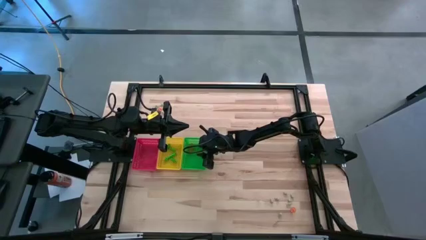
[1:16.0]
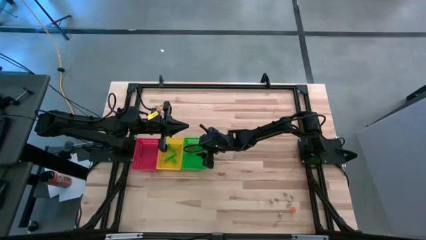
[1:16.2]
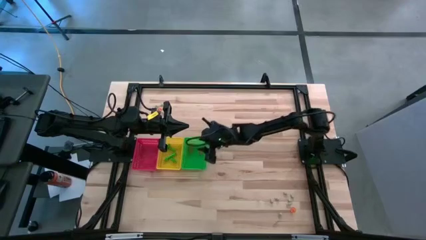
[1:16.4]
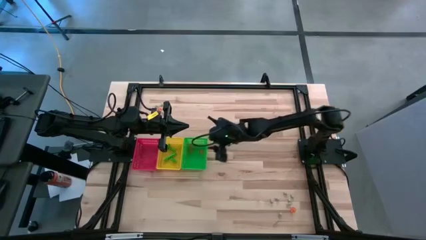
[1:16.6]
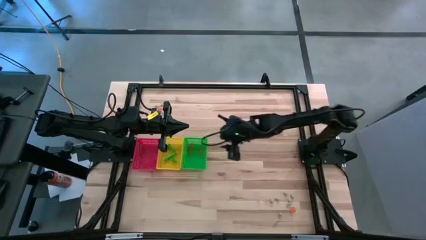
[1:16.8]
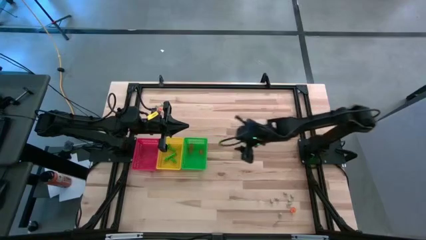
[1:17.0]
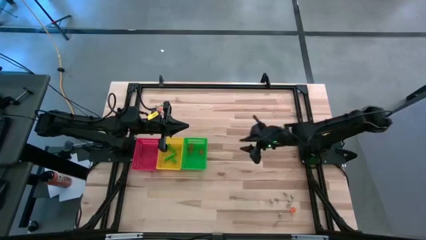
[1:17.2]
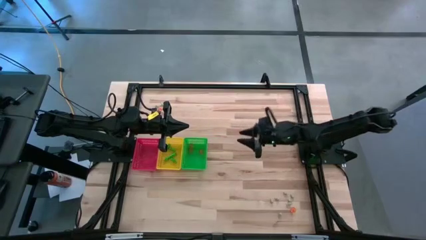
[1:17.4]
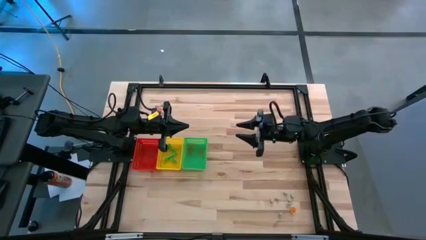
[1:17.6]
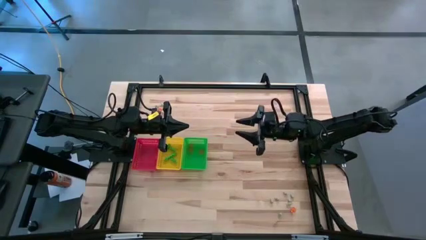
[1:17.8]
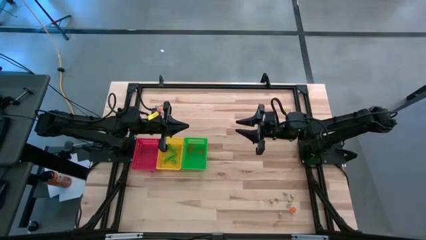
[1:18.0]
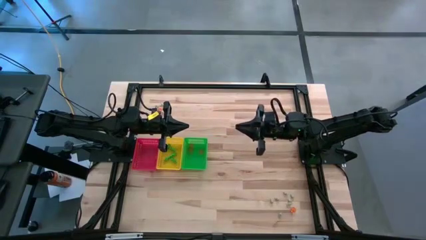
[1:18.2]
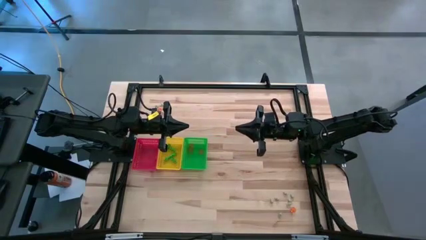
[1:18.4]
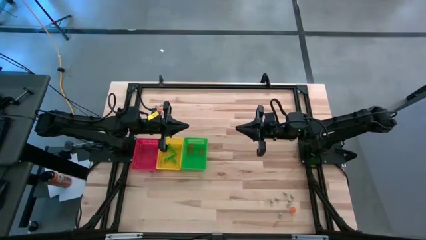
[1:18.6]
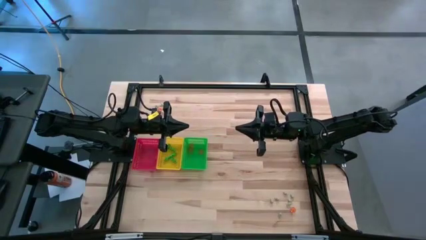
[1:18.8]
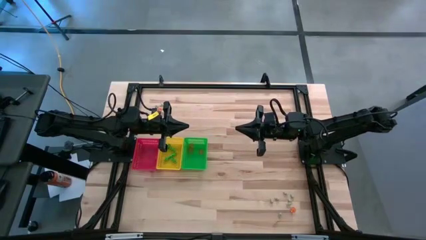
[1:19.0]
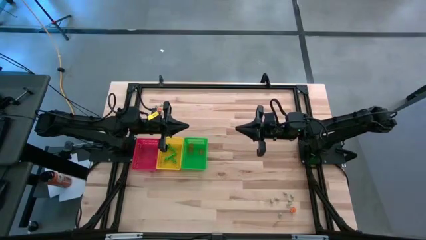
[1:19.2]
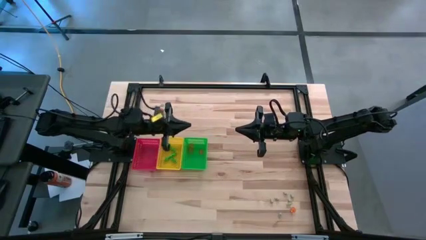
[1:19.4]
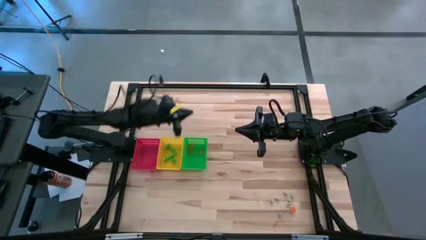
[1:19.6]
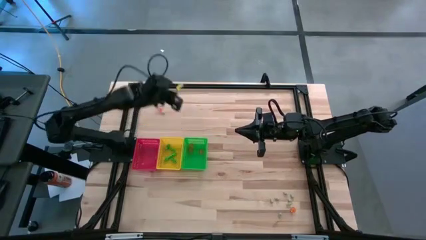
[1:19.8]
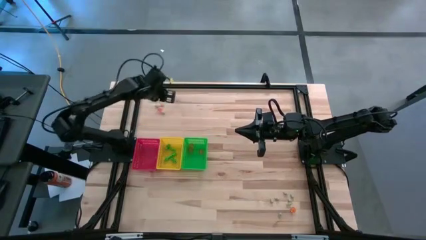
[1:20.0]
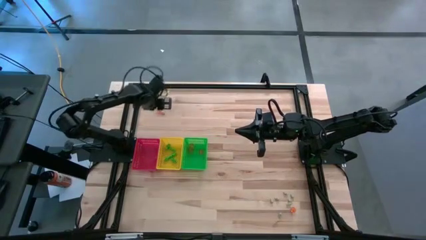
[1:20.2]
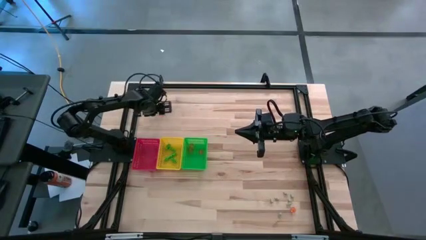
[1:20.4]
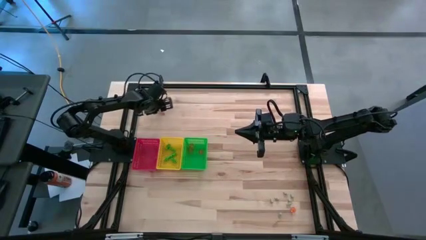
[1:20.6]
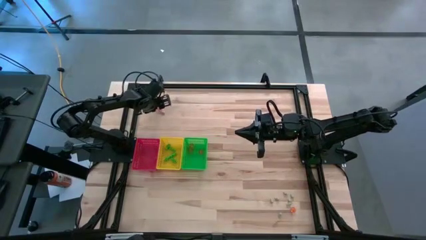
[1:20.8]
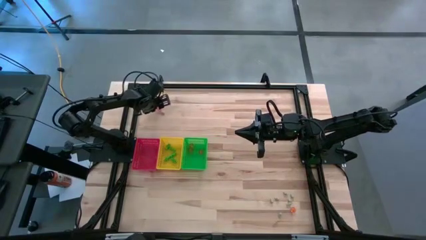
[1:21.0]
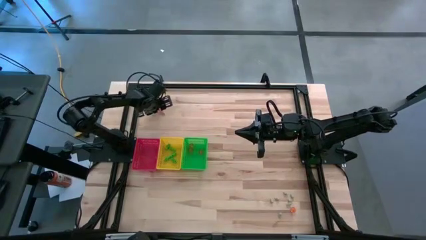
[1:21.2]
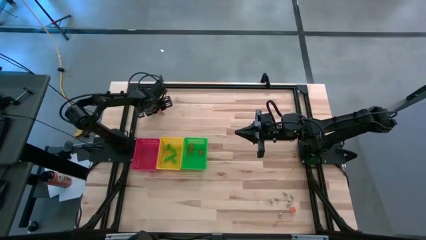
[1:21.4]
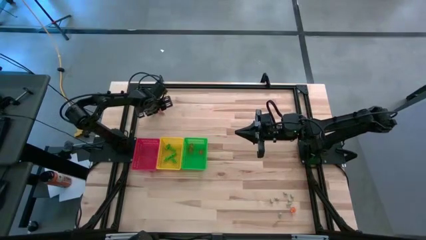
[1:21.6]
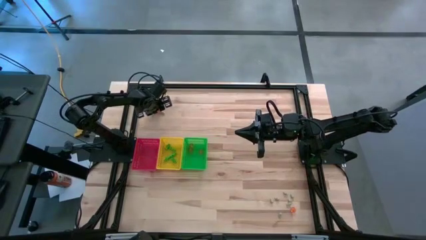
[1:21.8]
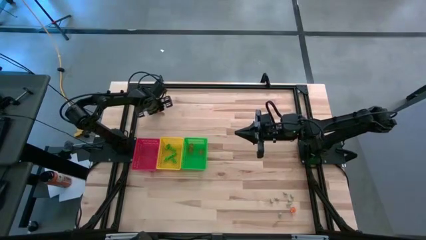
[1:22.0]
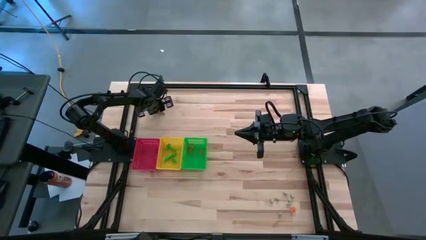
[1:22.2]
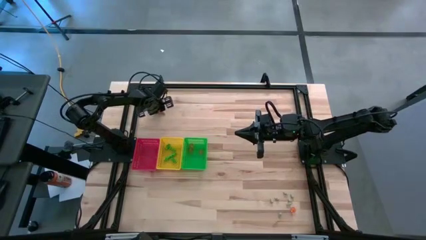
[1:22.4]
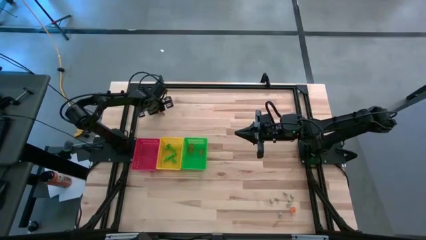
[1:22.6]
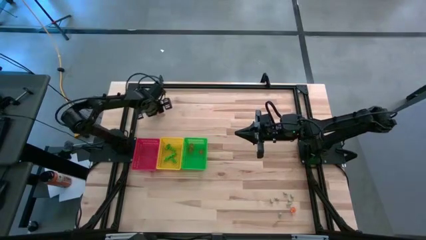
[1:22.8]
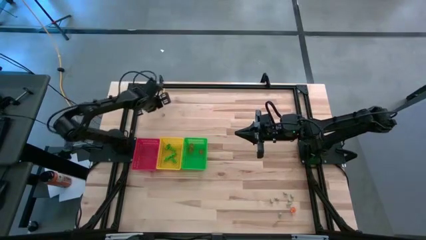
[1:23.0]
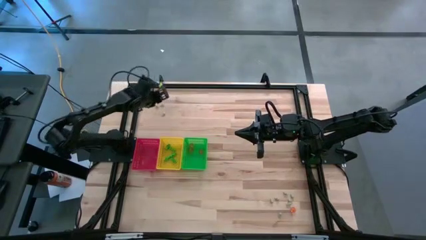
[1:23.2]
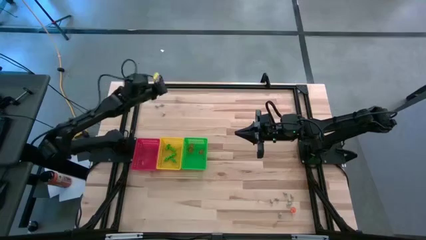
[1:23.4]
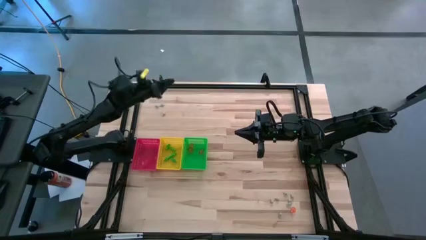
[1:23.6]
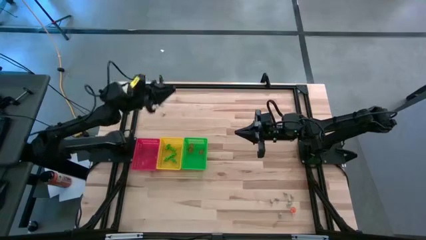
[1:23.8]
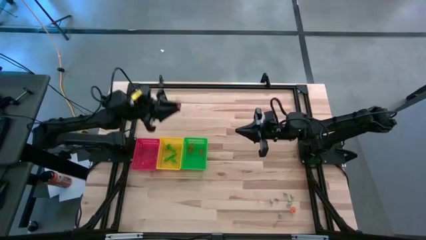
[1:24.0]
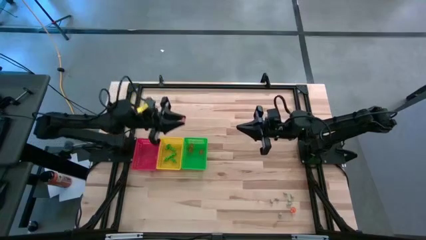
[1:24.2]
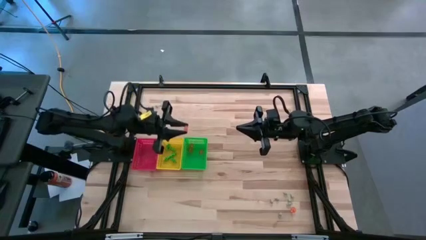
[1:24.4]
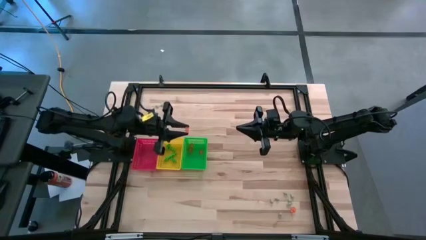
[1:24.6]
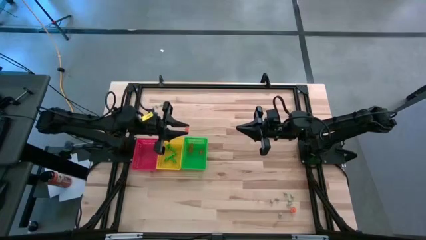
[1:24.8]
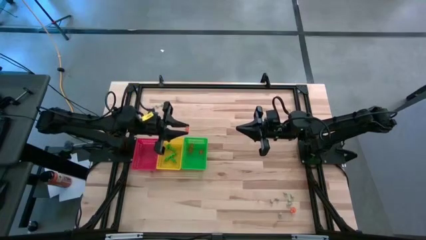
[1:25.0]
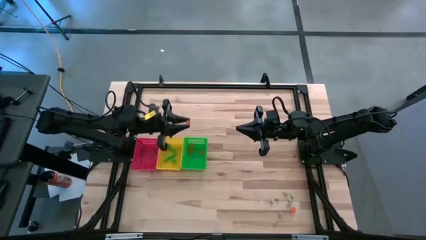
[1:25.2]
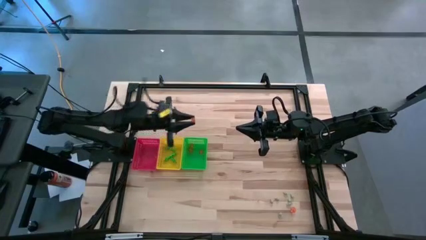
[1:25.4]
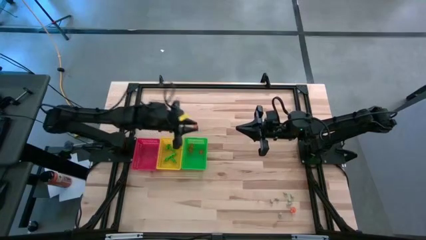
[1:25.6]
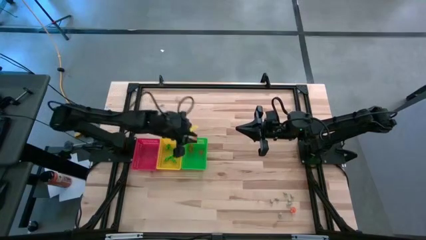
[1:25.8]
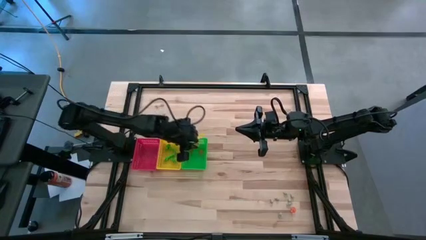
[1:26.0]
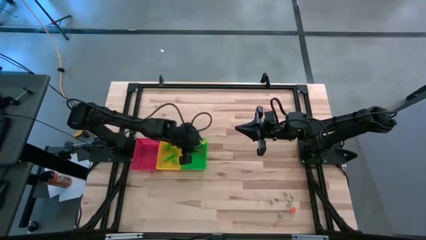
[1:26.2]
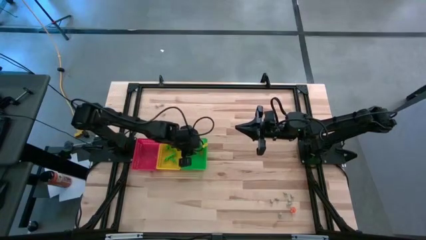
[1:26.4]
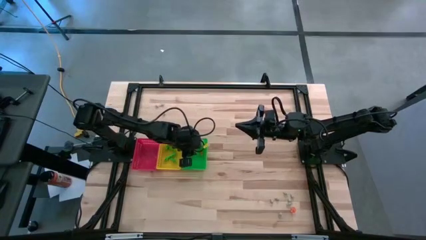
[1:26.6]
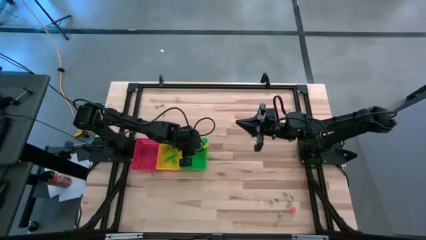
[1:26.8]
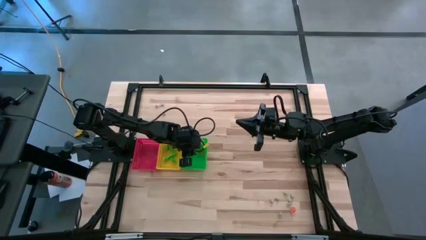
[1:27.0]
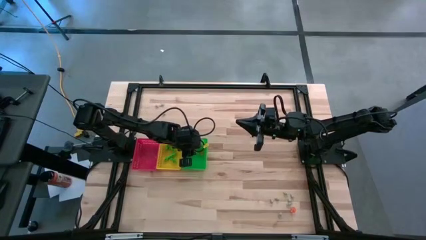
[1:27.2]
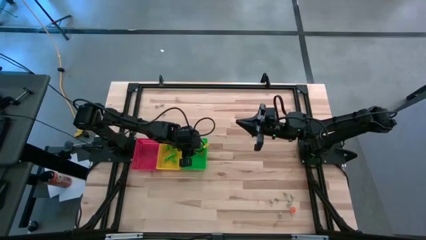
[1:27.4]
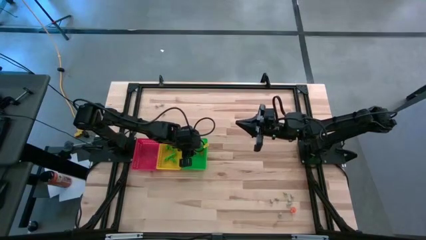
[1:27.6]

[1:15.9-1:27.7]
Task: Sort Halloween decoration
Put the orange pumpkin toy into the green bin

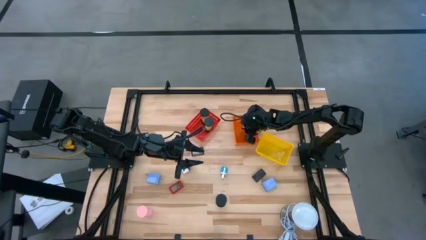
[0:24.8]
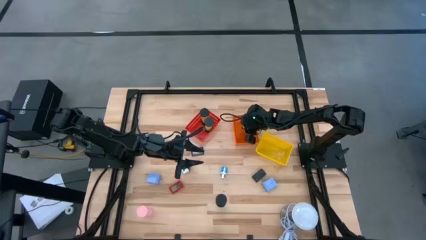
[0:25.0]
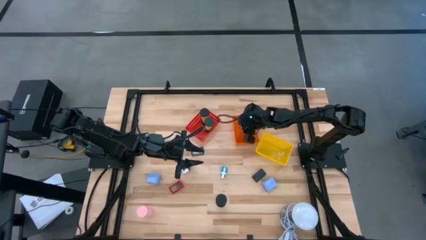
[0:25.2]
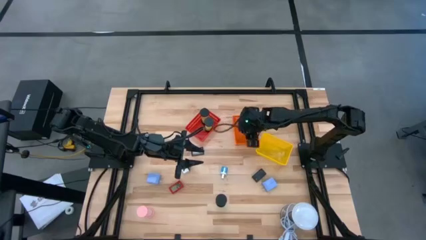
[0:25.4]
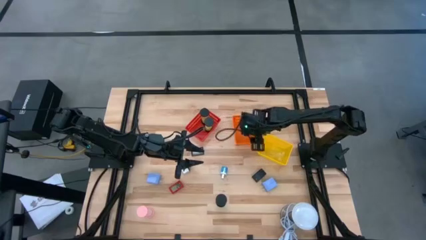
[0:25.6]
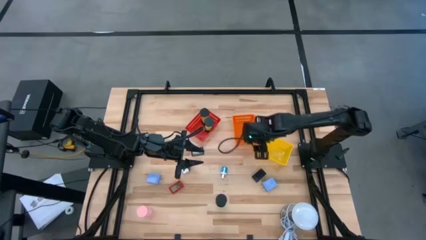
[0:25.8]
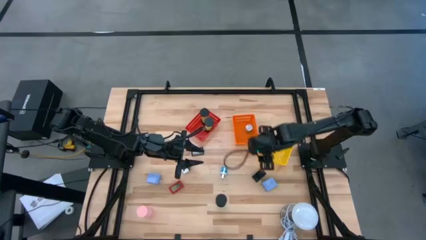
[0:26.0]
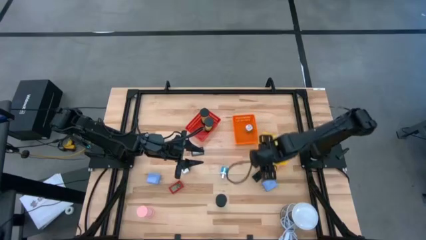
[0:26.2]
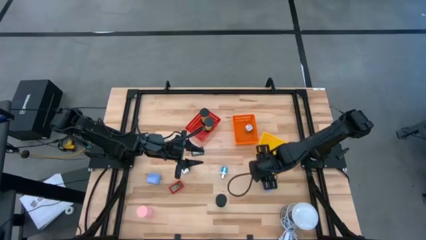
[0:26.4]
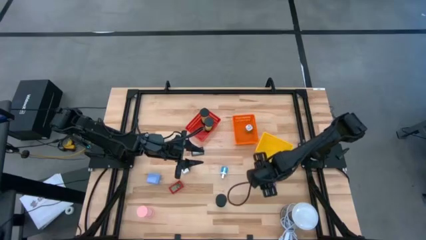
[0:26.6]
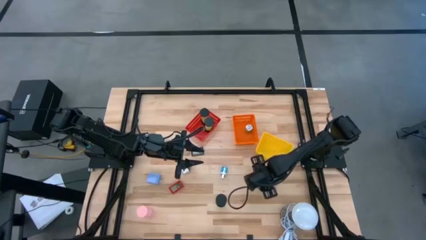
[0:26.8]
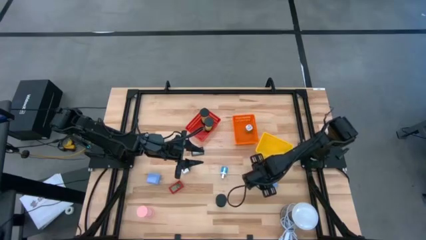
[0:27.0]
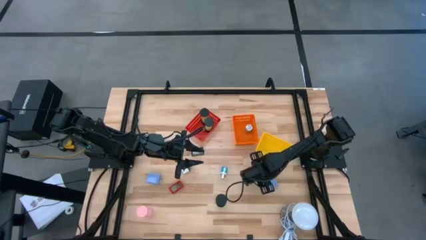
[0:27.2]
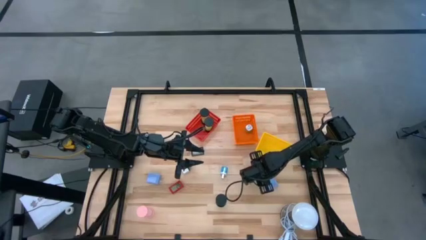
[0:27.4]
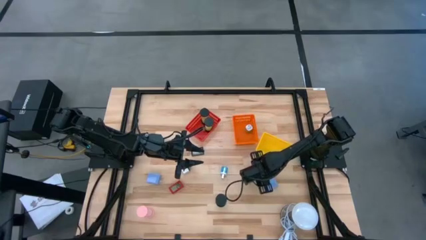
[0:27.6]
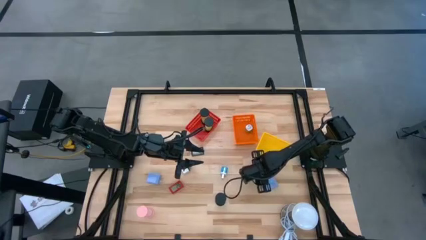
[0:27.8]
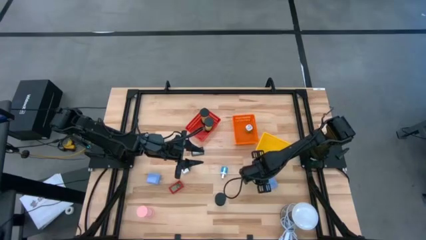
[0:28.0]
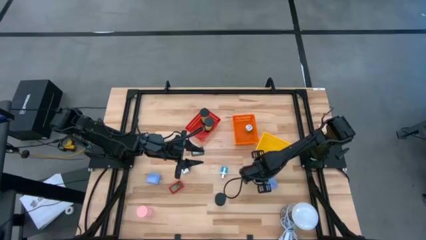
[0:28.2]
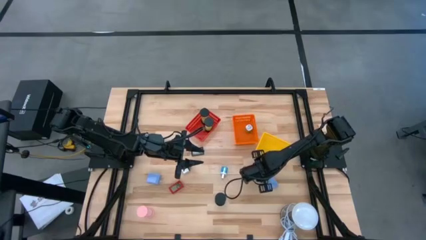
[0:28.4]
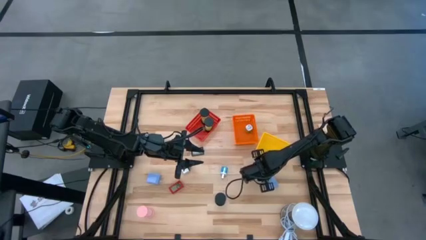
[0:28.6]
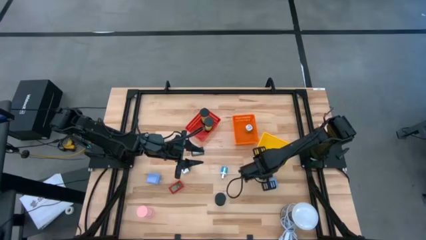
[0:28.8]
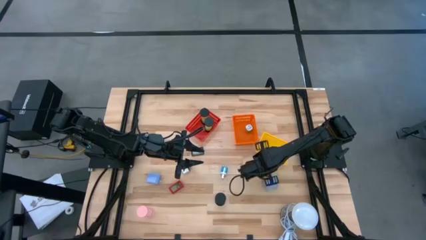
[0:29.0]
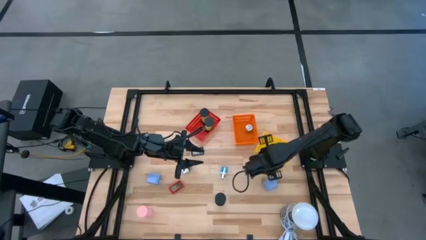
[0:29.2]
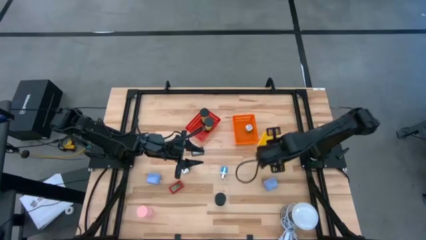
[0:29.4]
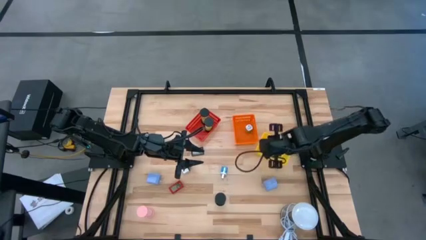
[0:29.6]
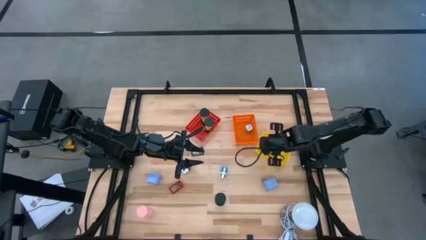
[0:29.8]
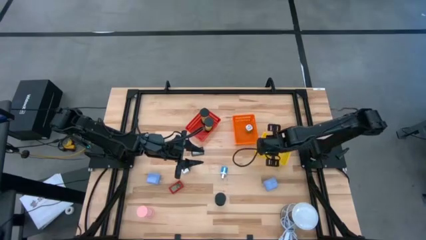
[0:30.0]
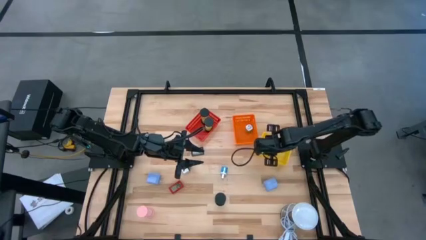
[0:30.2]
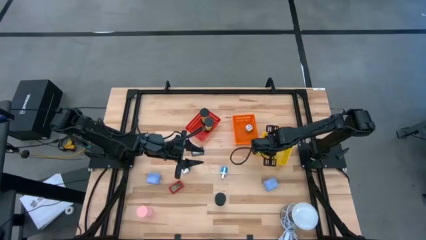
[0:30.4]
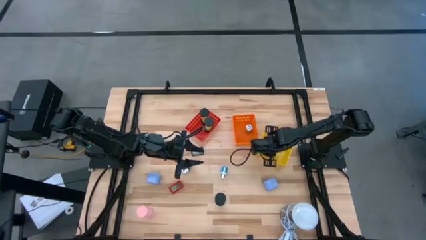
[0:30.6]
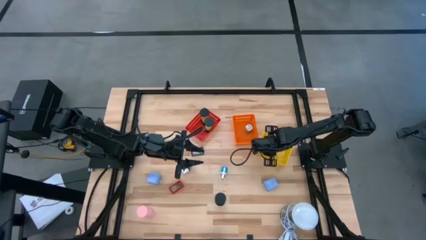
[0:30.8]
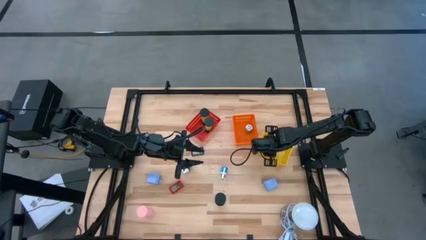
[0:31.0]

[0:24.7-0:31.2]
Task: Pick & Place Office items
Put the right black digital timer into the yellow bin
